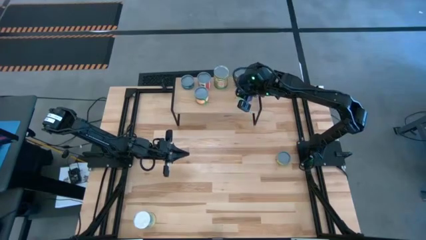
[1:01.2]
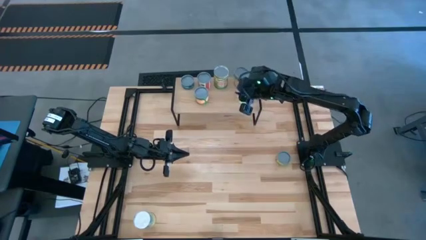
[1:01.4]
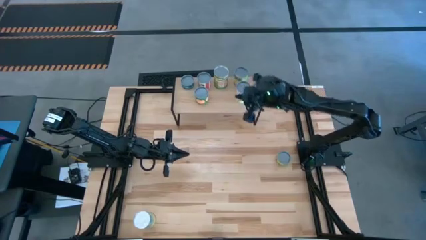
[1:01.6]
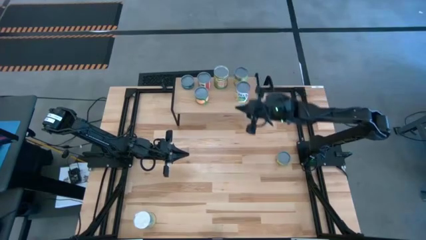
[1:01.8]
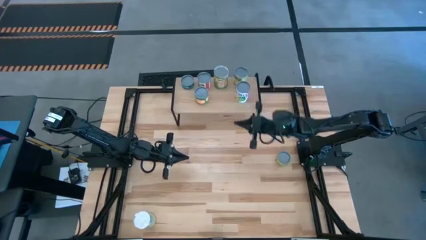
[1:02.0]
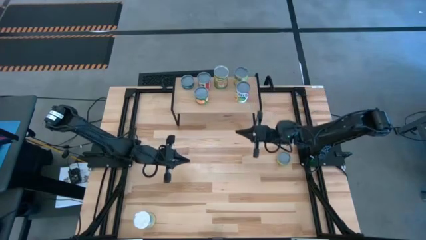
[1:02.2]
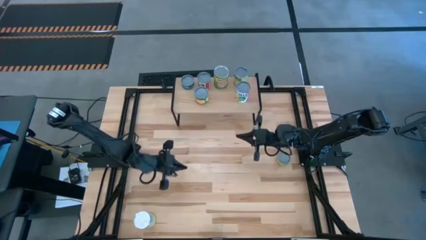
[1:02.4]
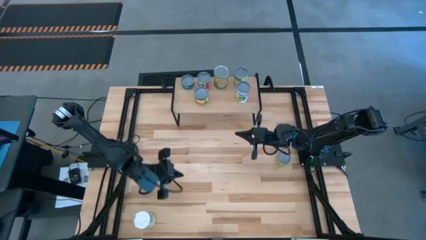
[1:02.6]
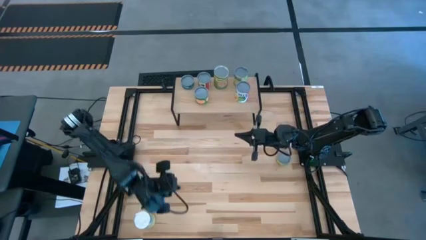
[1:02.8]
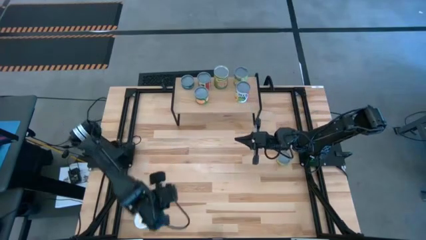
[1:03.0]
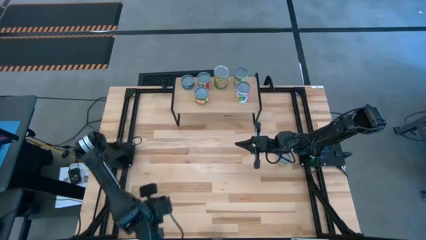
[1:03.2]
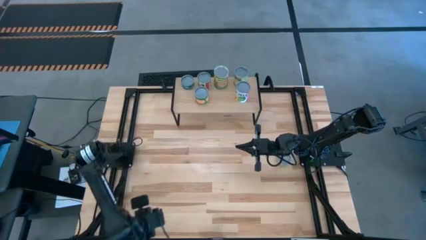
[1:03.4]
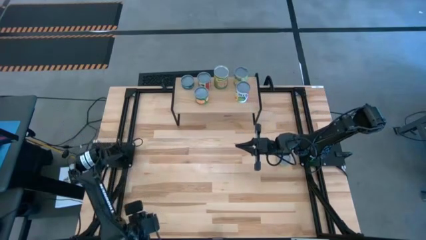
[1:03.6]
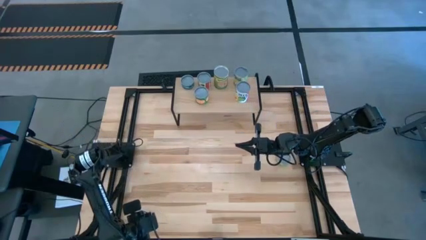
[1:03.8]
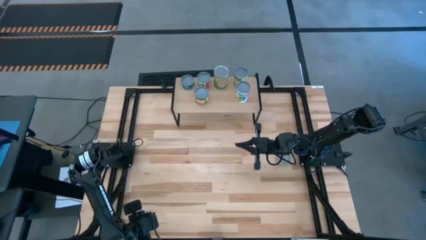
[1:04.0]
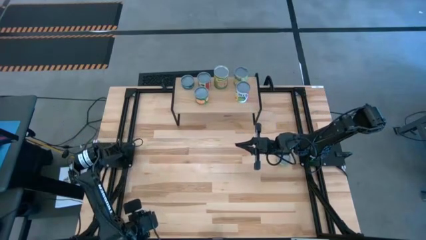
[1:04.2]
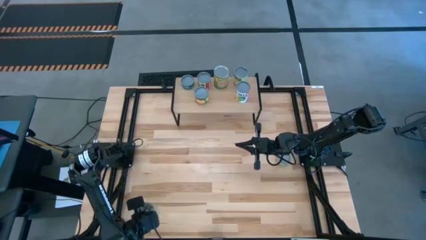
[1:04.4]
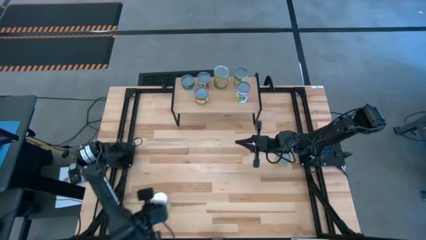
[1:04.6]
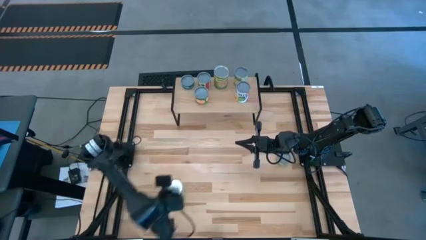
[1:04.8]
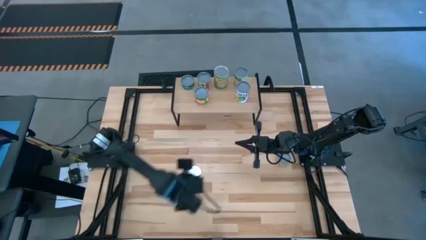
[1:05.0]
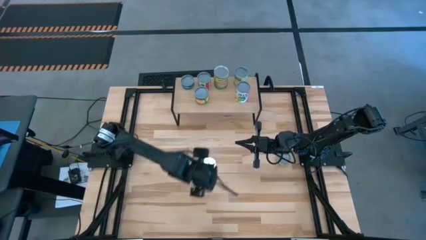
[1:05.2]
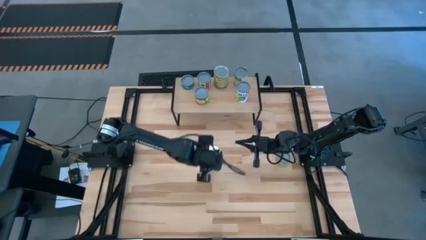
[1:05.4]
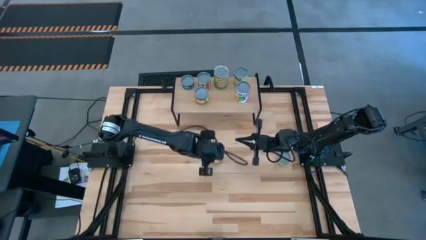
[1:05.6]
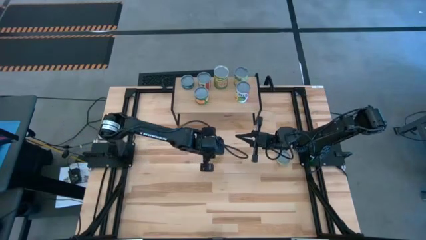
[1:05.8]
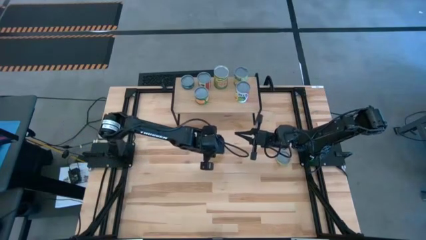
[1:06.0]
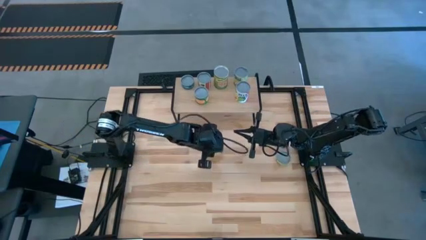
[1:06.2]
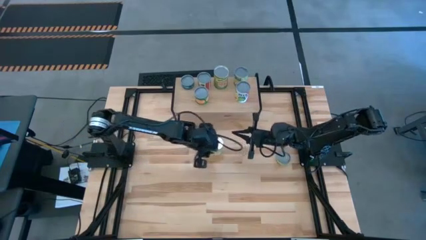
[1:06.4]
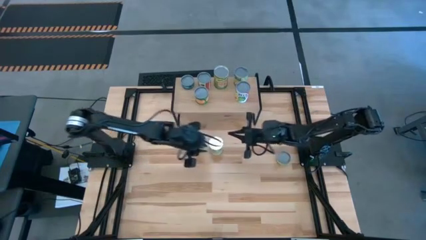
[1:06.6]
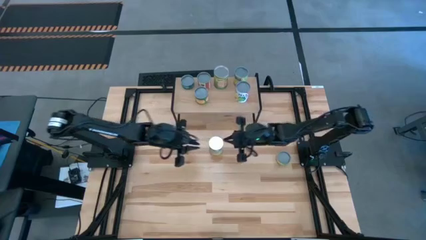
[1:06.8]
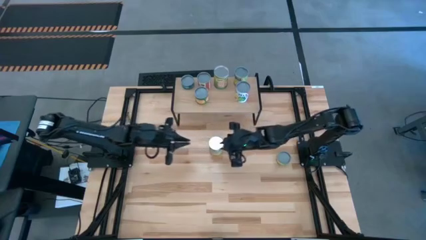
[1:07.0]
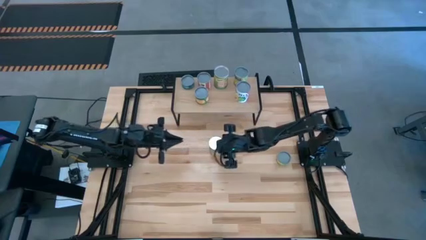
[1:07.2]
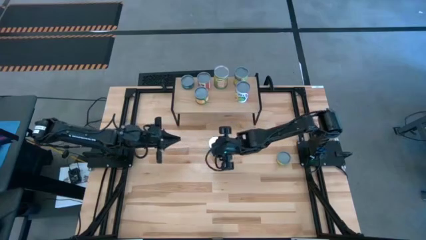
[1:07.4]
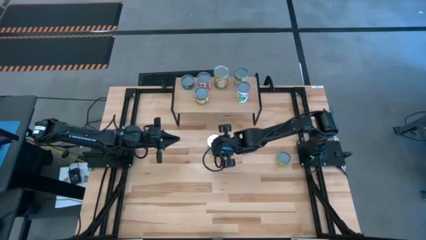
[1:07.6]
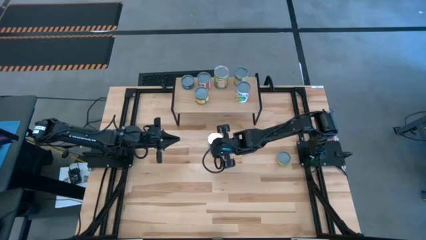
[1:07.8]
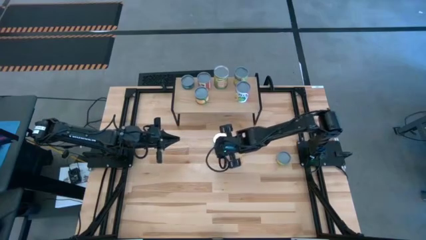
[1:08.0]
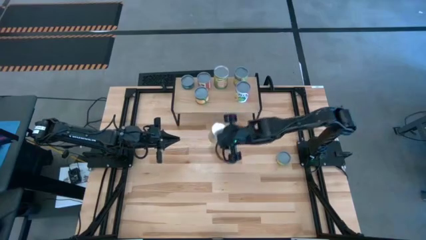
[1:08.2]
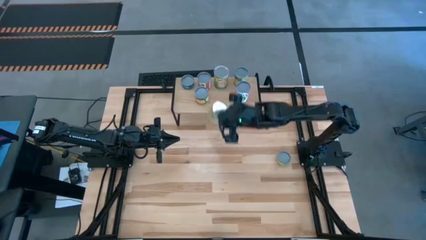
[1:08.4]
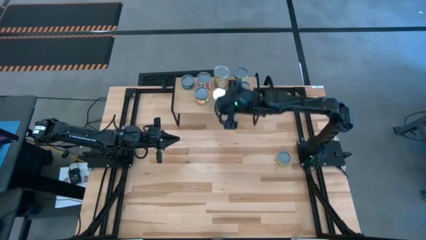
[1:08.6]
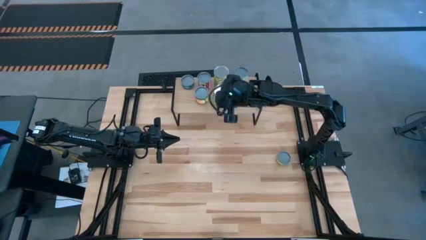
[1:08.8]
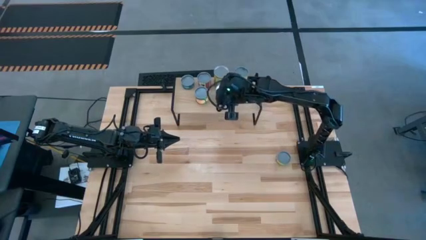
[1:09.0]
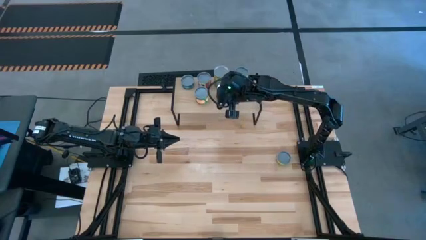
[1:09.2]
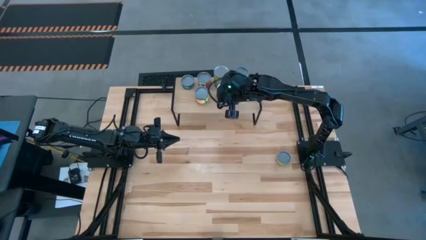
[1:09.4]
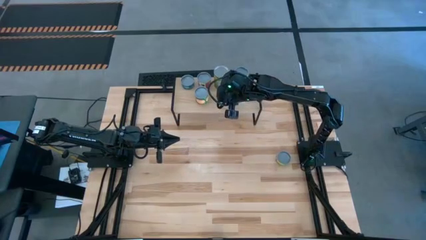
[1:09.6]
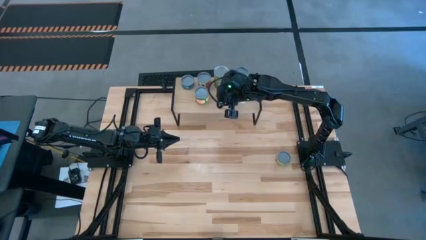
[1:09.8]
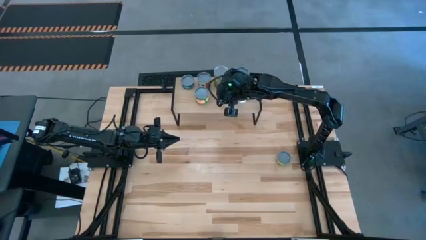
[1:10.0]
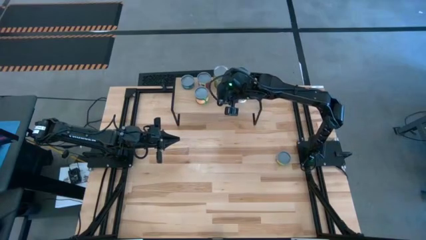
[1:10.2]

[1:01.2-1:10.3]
Task: Pick and place cans onto a shelf
Put the canned carrots on the shelf

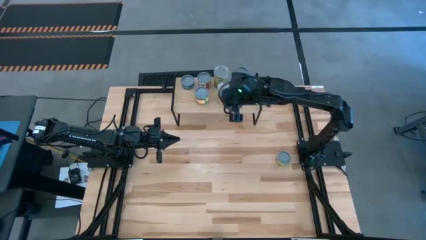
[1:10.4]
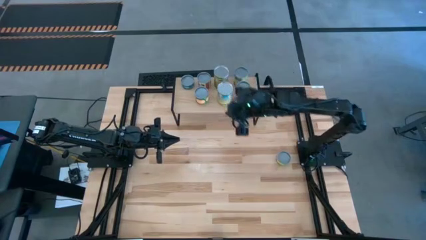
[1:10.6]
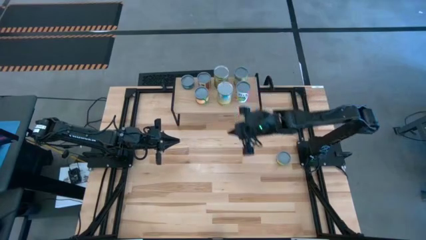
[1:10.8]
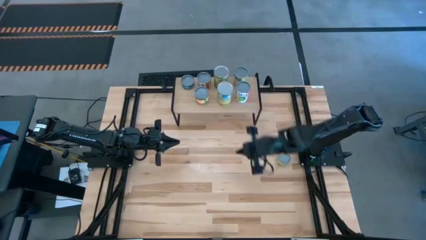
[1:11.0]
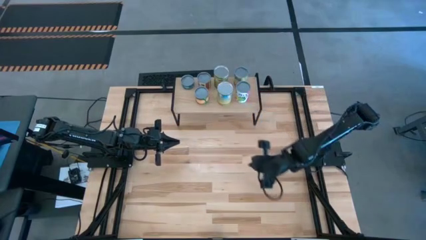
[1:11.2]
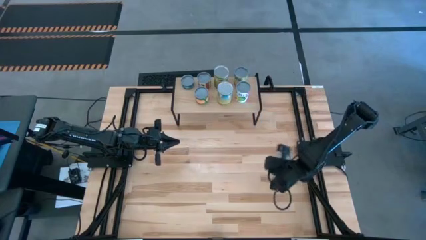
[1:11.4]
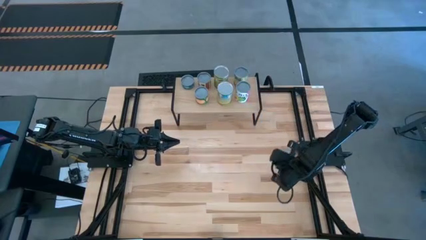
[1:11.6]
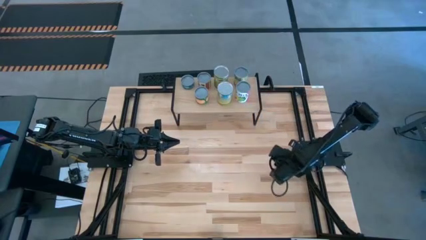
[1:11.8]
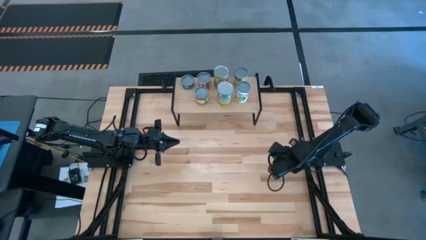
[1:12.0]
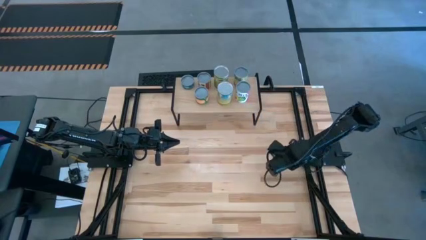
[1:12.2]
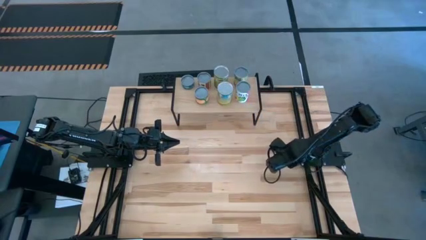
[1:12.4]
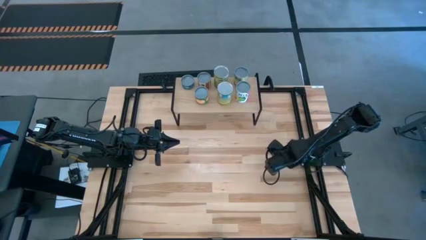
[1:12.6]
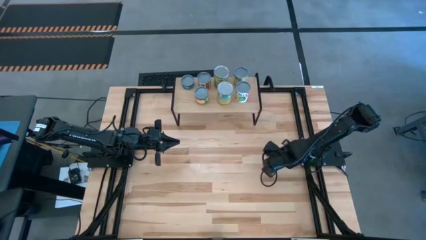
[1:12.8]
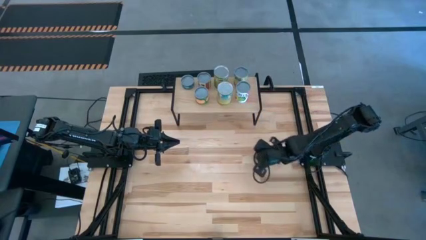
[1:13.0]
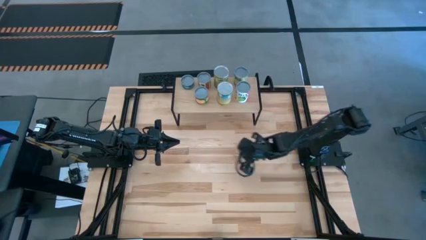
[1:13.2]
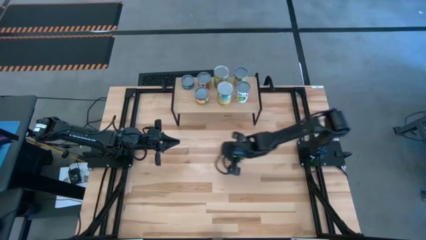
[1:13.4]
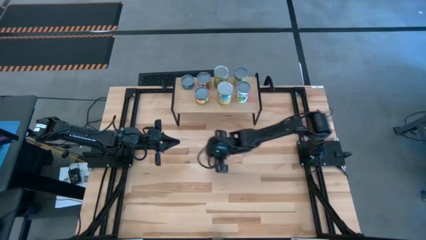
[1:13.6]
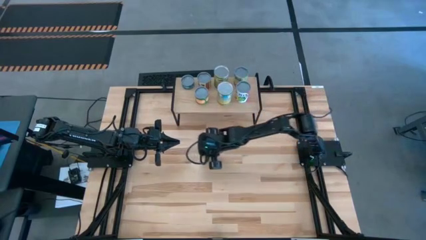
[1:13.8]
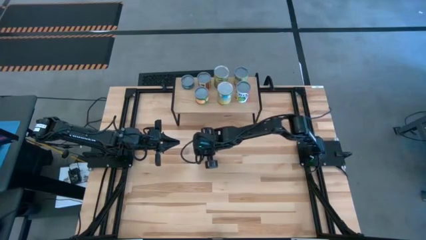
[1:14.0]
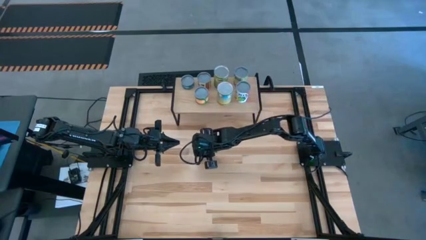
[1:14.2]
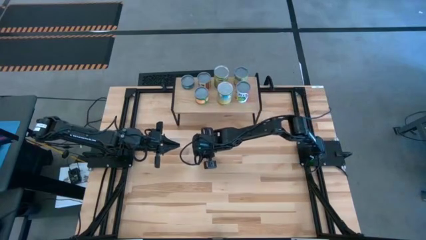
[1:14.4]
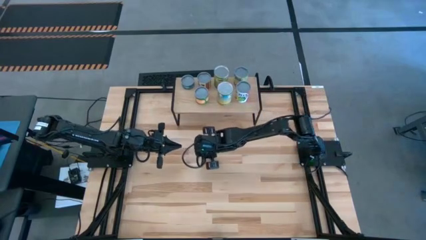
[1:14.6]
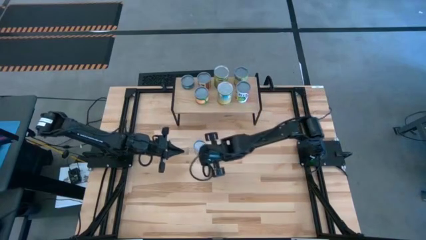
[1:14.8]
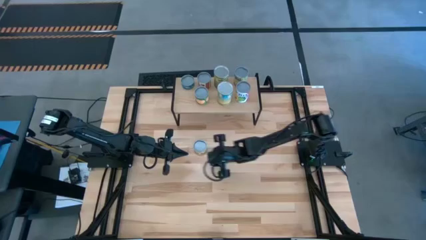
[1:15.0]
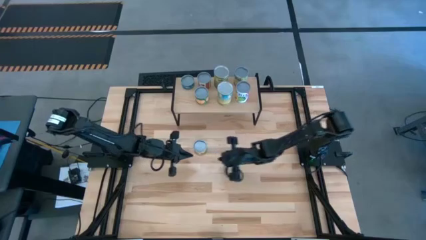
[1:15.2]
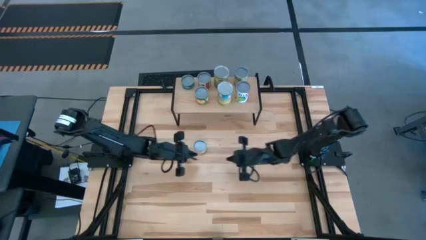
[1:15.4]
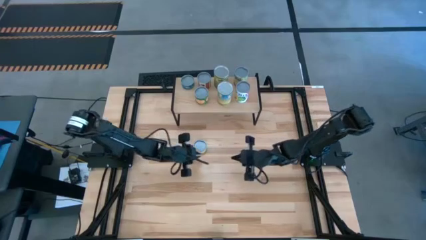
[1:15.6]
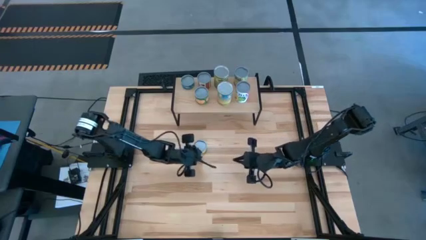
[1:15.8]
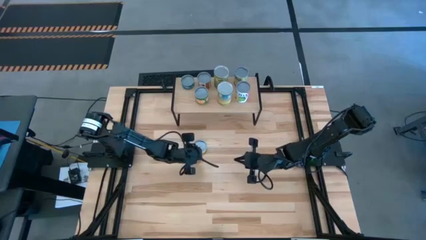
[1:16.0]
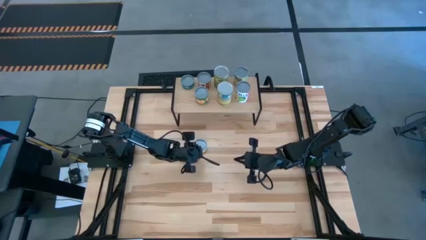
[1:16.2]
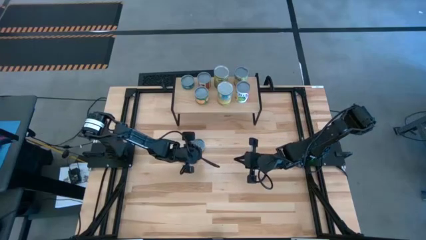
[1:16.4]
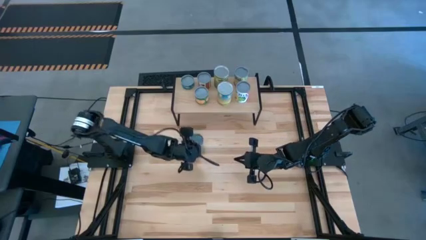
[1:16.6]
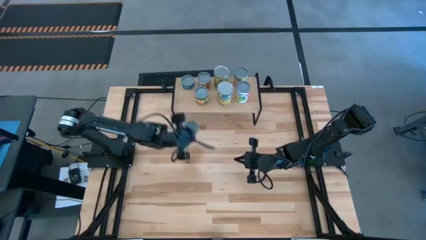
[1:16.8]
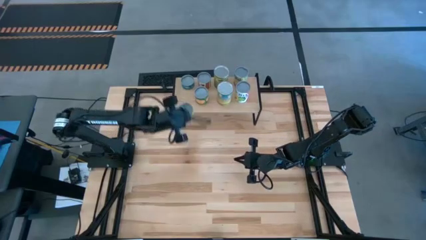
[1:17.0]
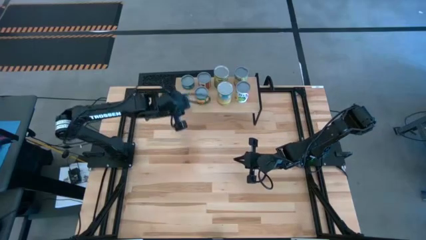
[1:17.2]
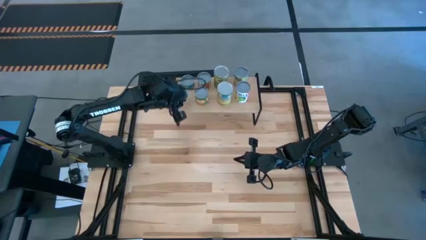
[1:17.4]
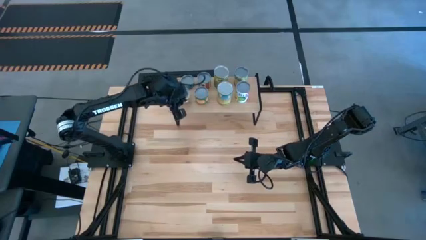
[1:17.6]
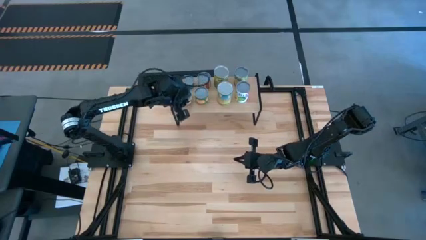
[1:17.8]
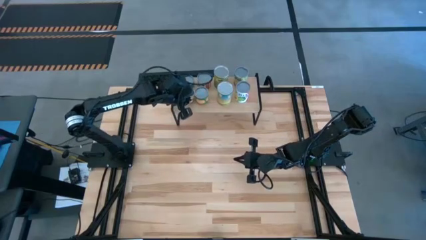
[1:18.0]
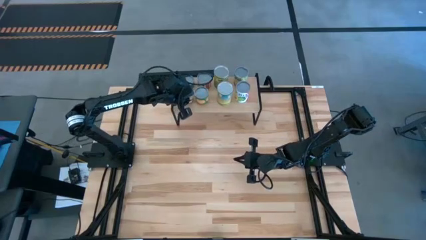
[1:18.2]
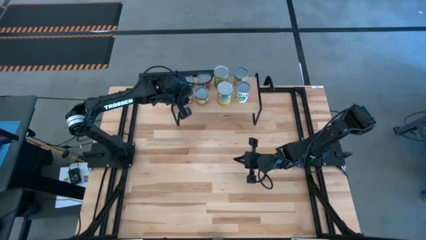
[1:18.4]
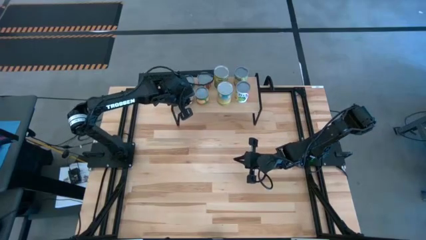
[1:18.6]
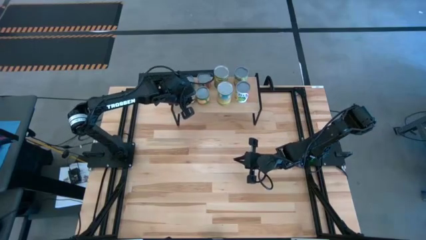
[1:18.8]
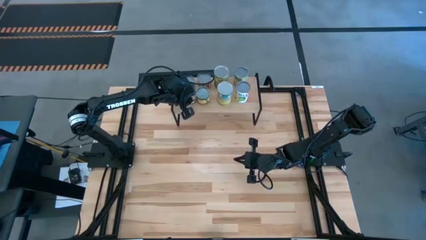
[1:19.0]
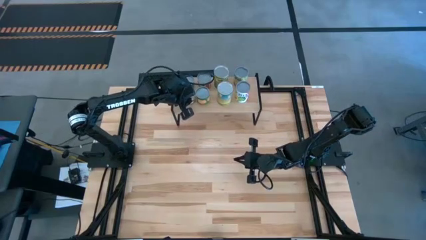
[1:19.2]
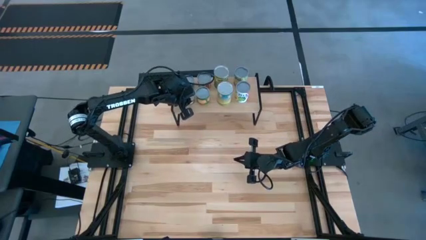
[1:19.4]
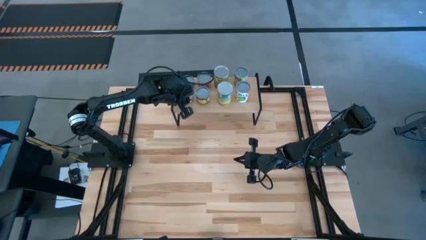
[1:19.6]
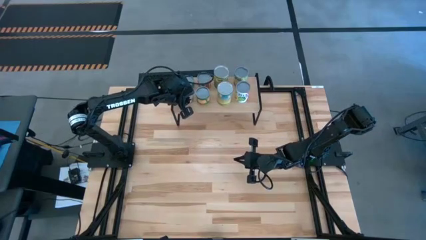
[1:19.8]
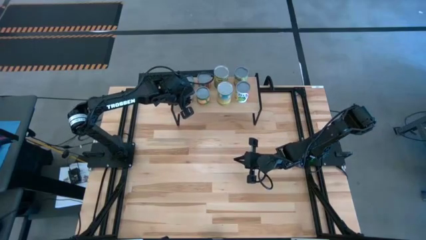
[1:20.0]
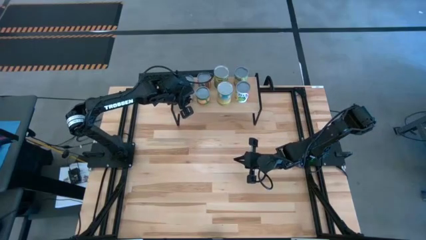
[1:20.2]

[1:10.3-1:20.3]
Put the orange can on the shelf
